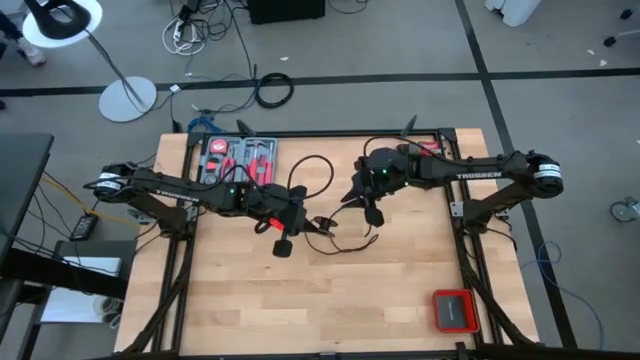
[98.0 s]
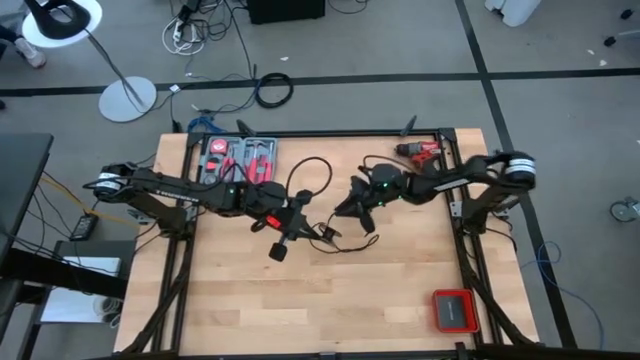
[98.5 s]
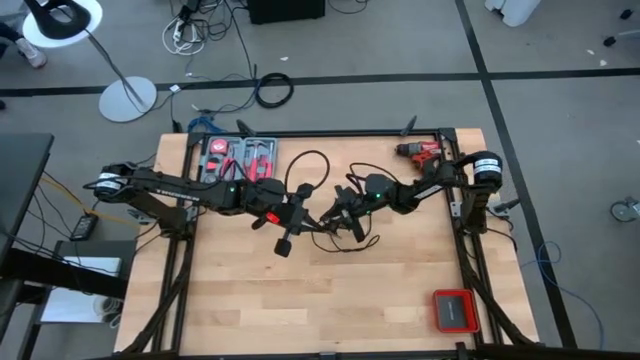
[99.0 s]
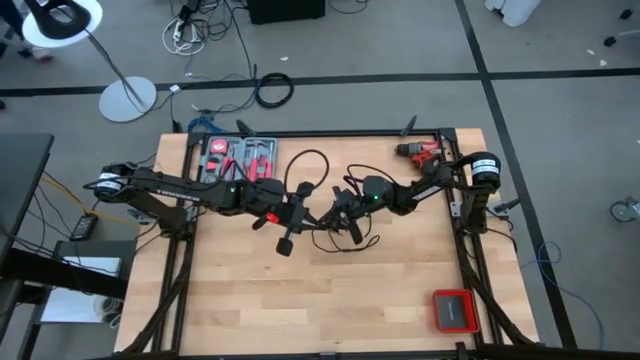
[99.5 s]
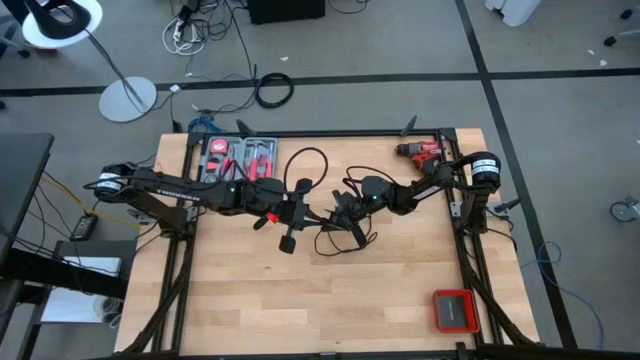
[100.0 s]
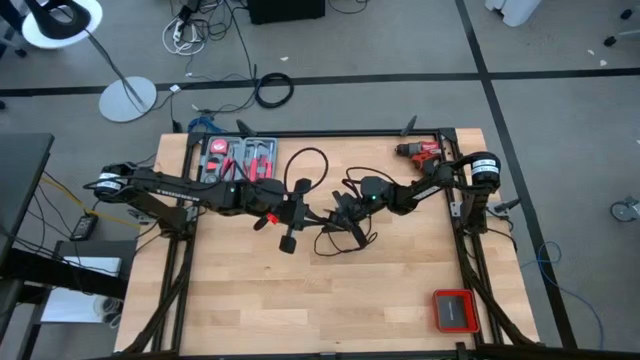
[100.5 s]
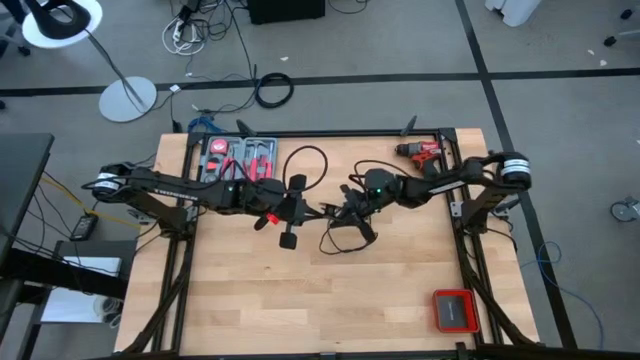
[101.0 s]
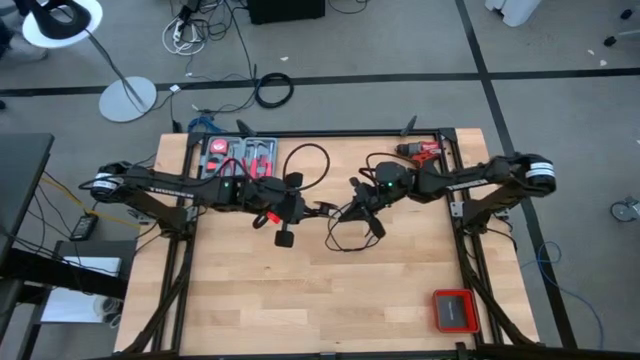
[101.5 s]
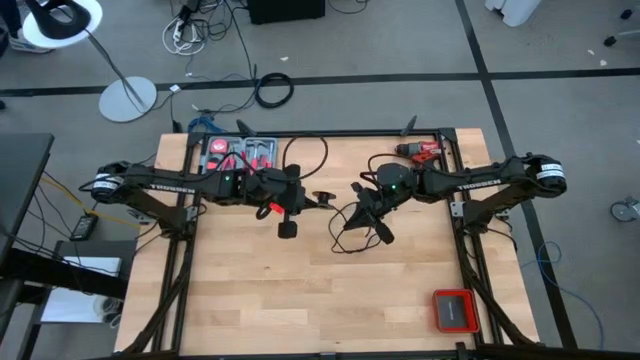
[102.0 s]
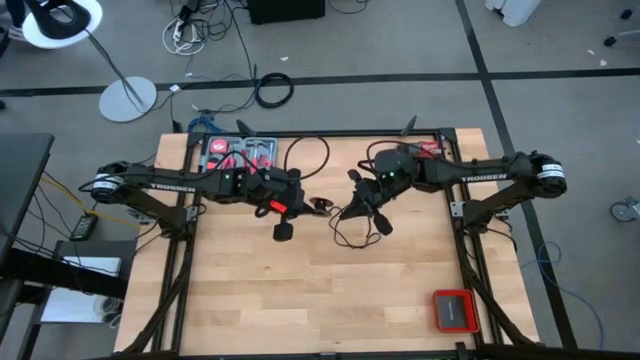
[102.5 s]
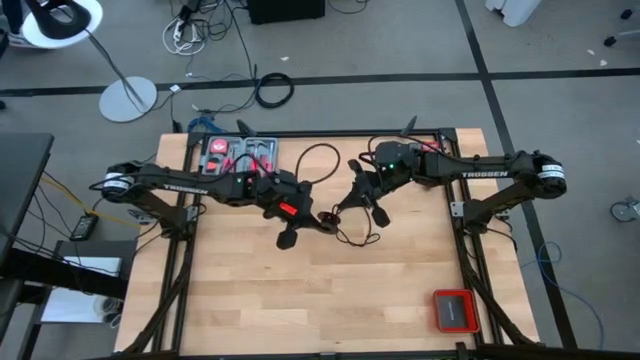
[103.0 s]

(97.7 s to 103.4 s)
Task: Coil cords
Coil the black wire on the black spool

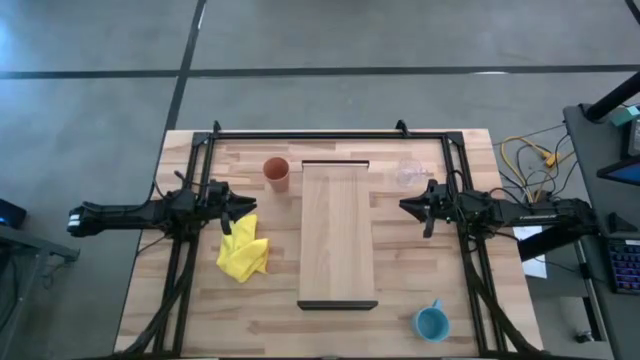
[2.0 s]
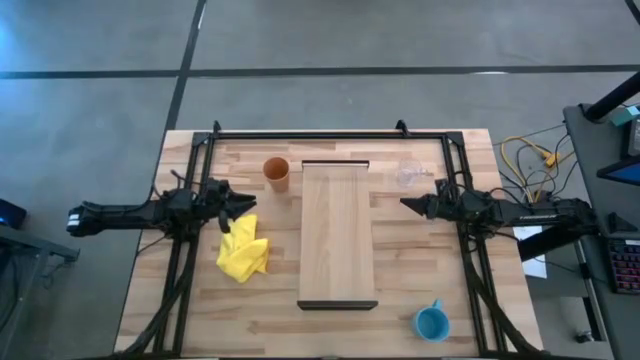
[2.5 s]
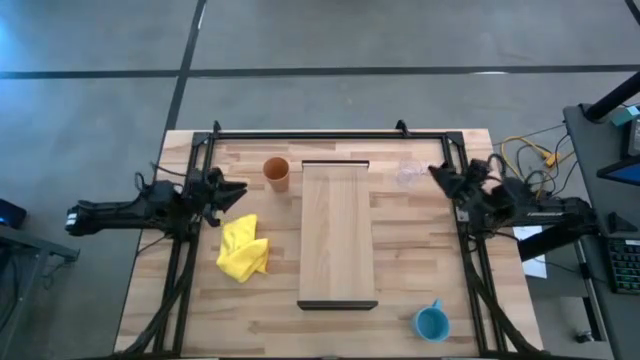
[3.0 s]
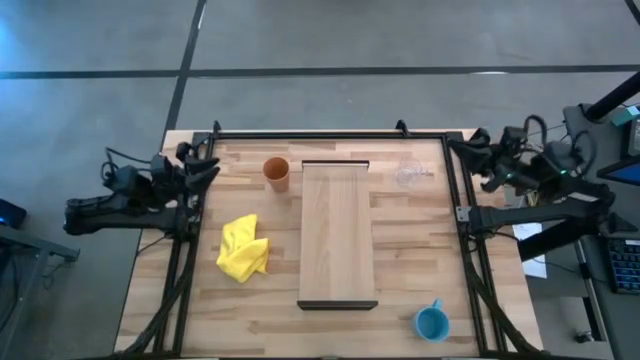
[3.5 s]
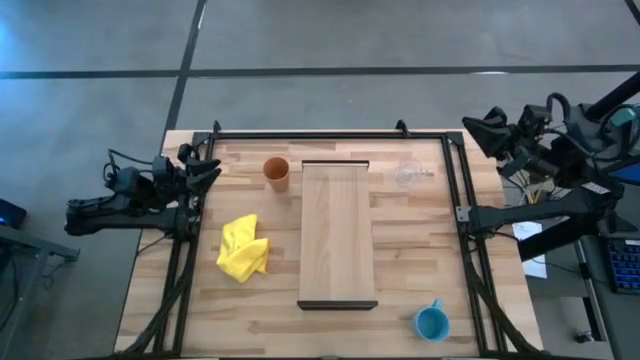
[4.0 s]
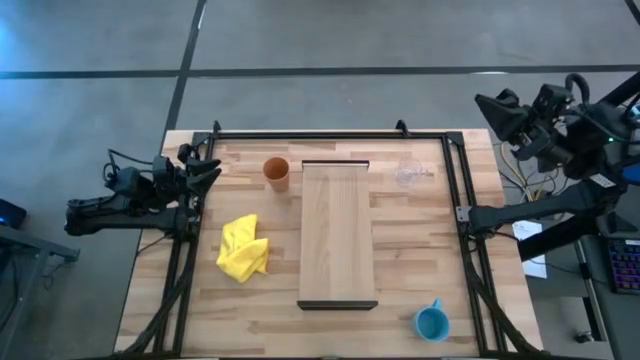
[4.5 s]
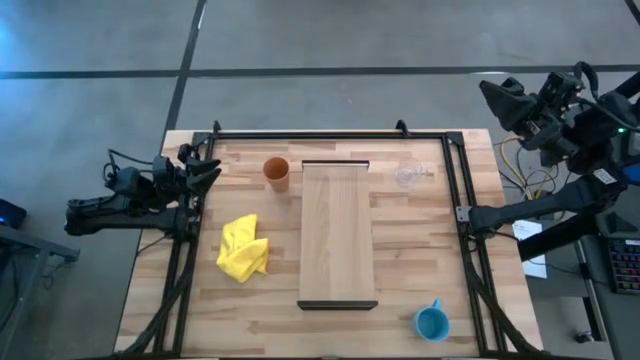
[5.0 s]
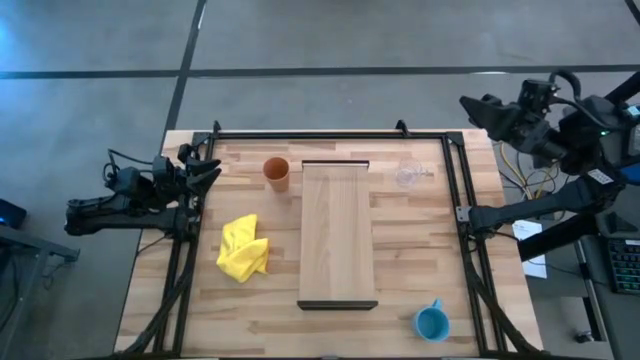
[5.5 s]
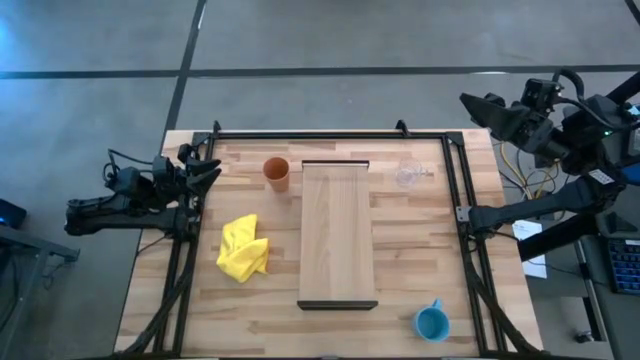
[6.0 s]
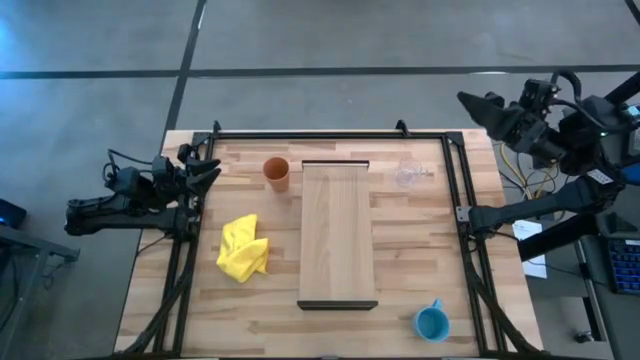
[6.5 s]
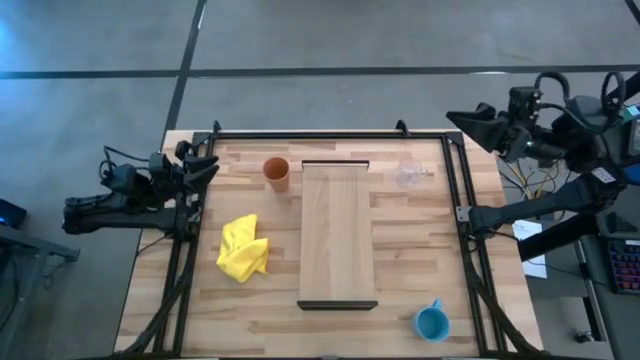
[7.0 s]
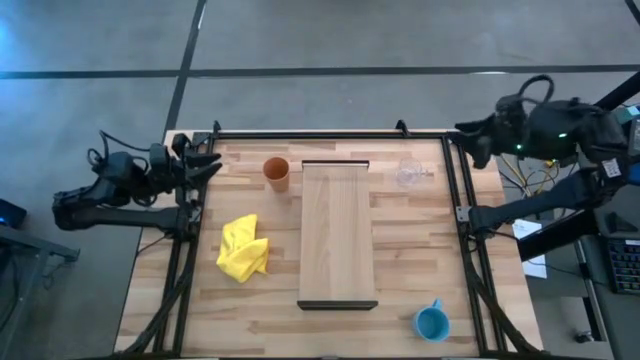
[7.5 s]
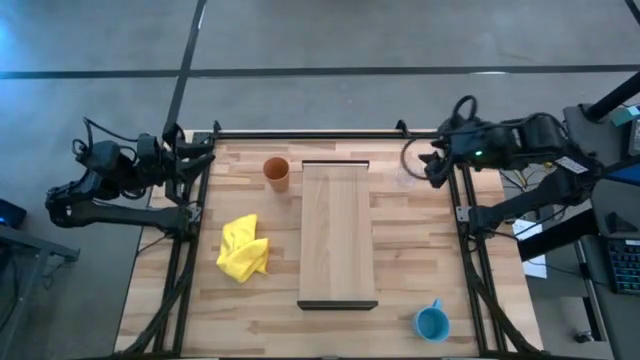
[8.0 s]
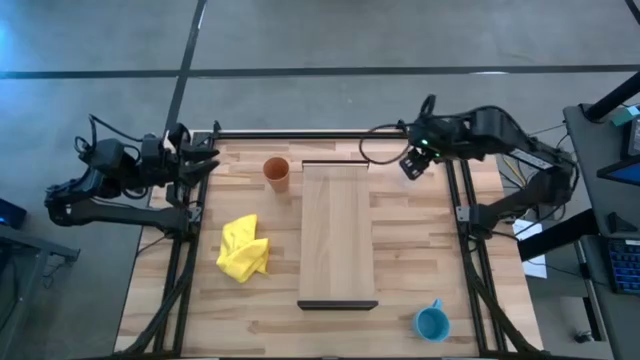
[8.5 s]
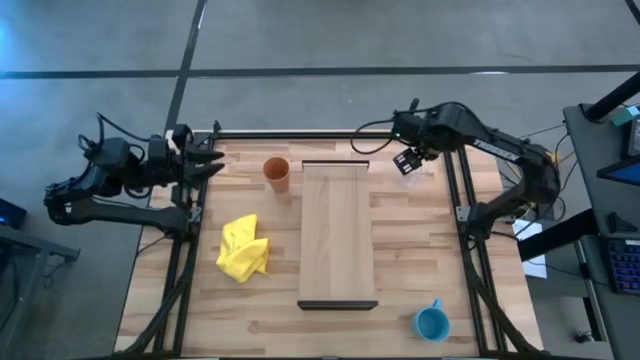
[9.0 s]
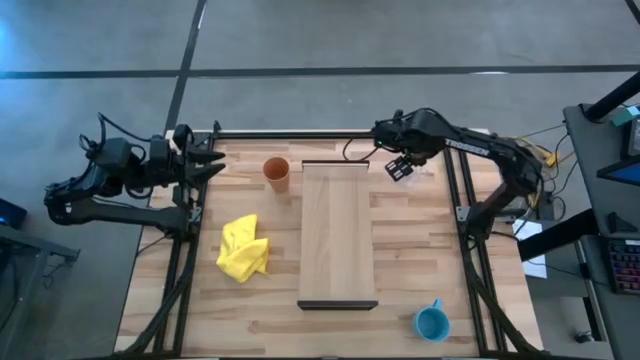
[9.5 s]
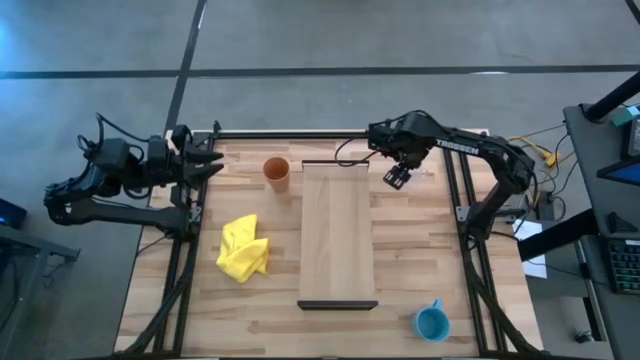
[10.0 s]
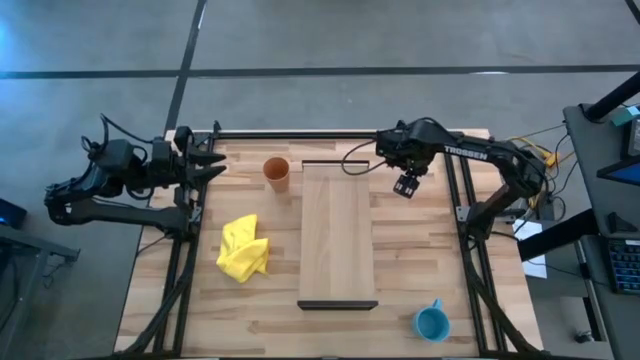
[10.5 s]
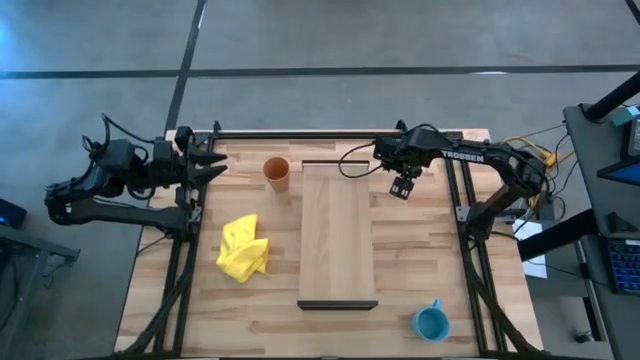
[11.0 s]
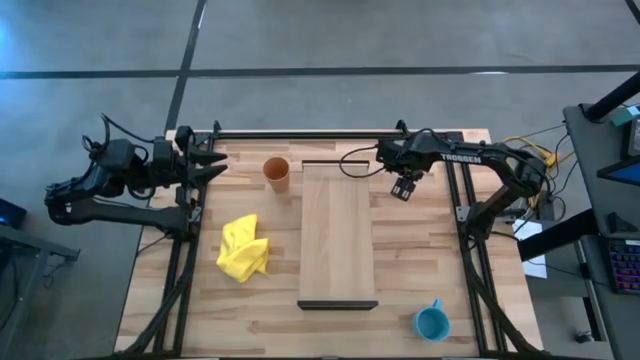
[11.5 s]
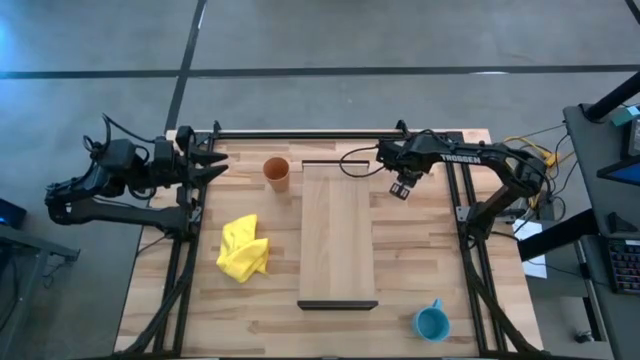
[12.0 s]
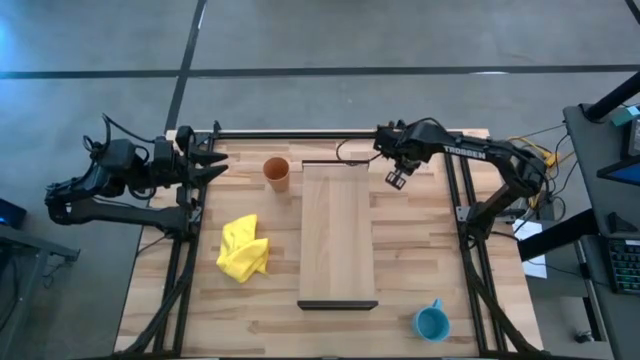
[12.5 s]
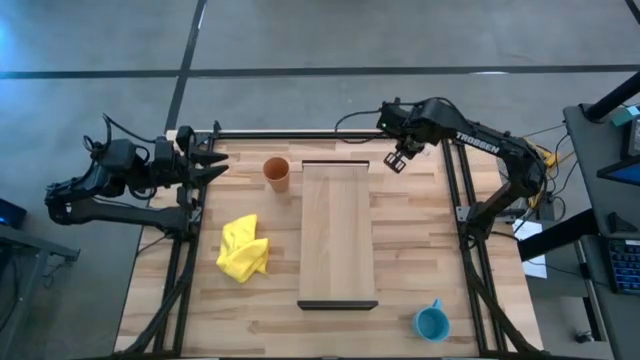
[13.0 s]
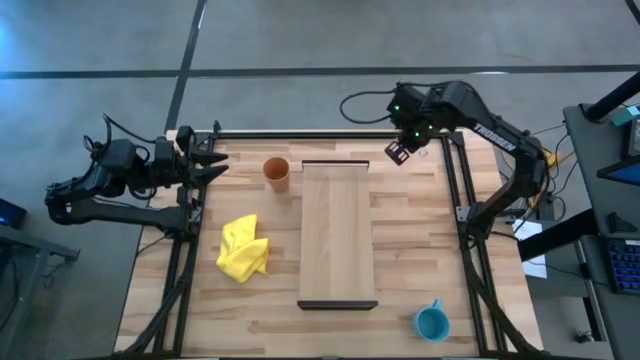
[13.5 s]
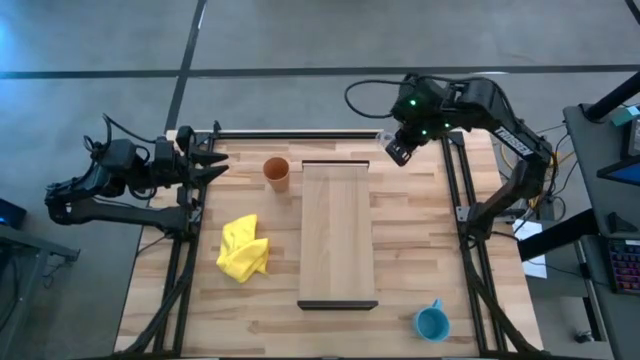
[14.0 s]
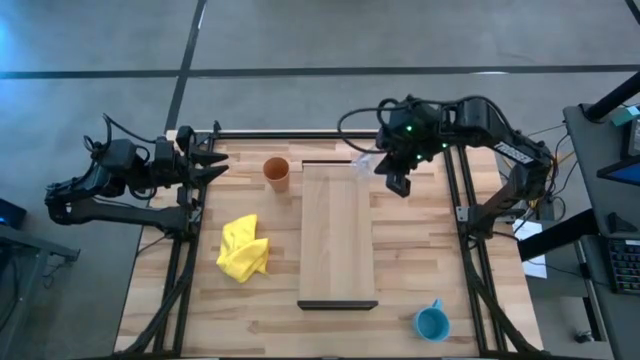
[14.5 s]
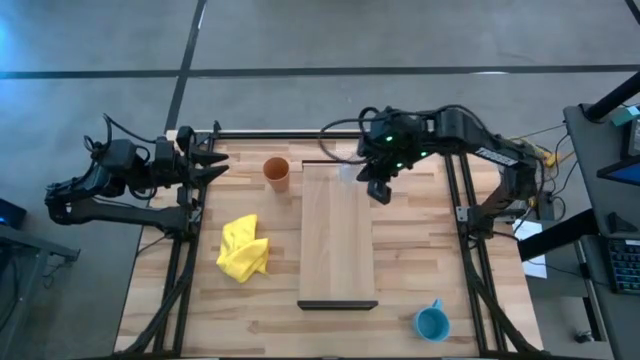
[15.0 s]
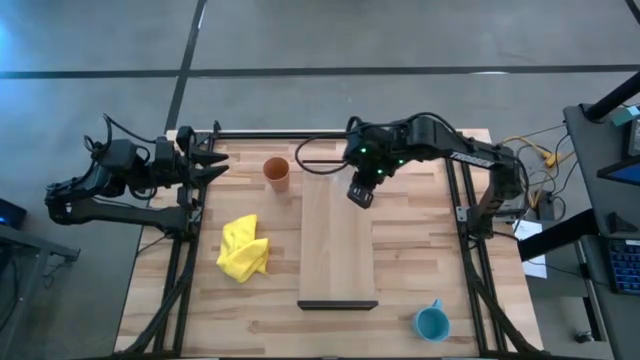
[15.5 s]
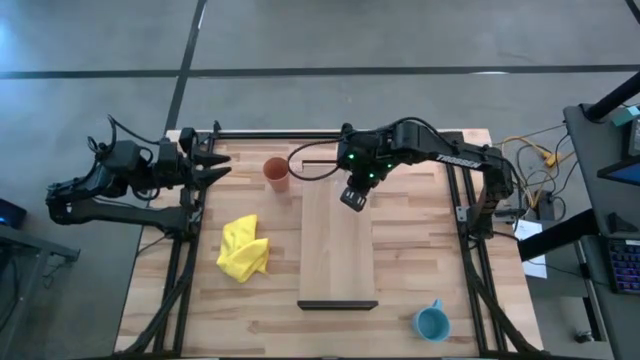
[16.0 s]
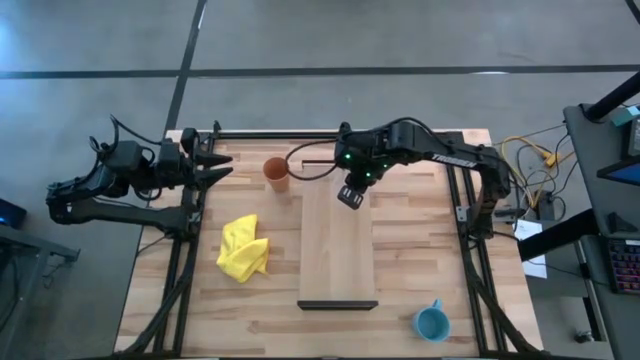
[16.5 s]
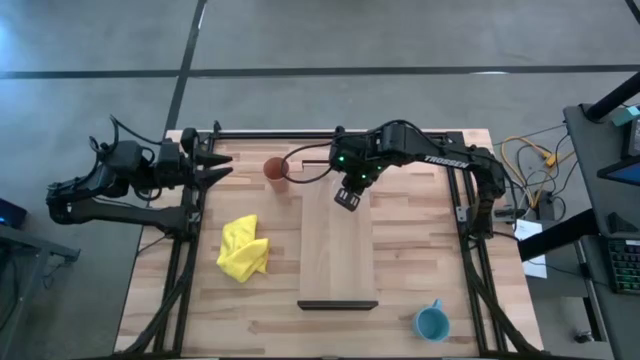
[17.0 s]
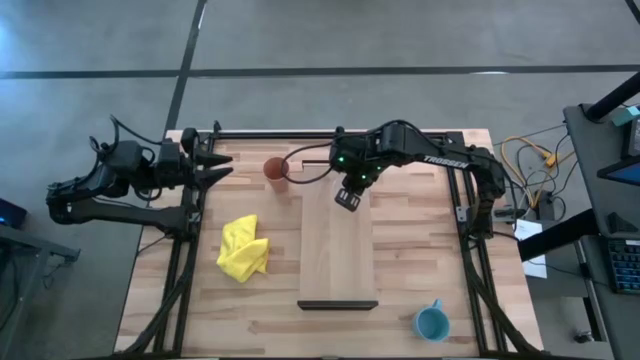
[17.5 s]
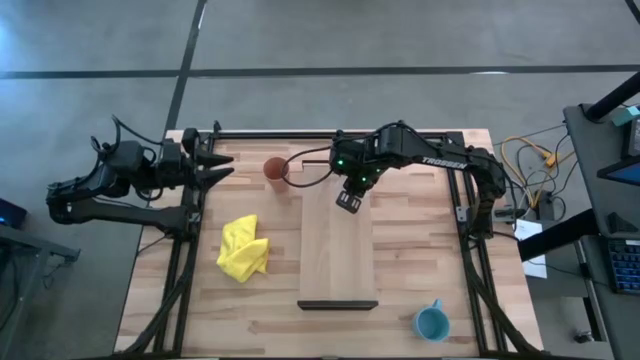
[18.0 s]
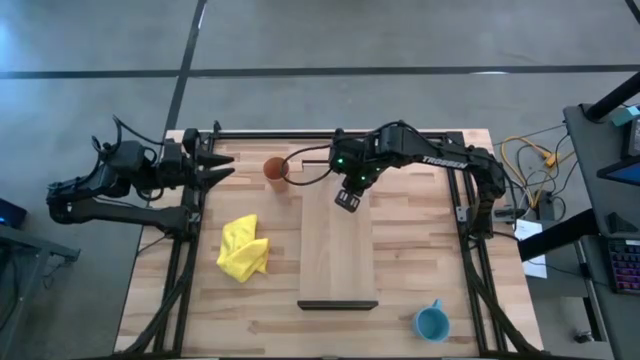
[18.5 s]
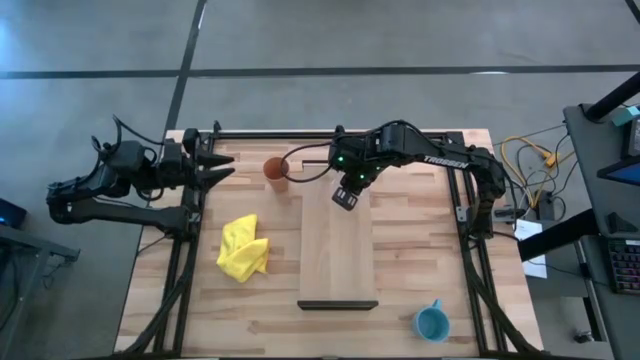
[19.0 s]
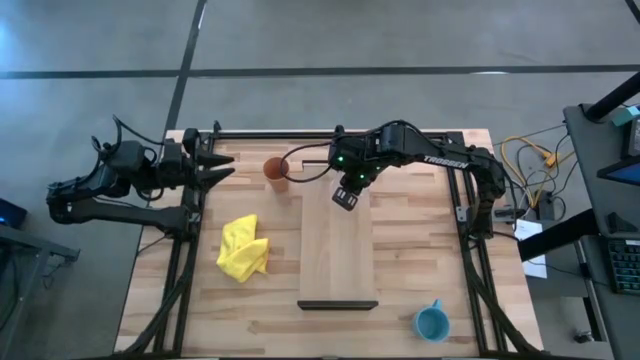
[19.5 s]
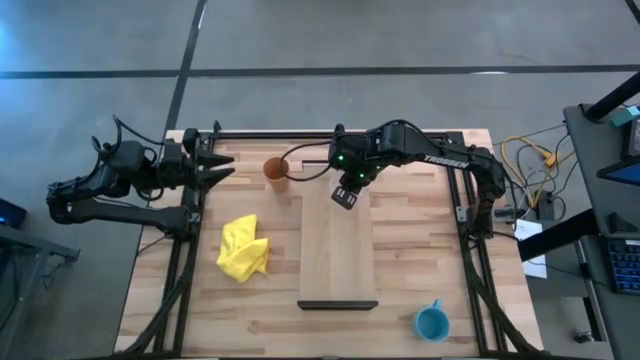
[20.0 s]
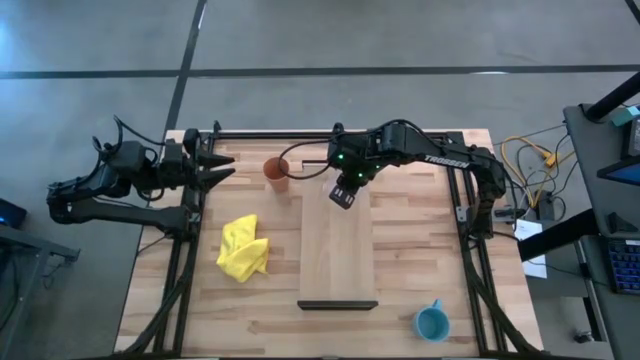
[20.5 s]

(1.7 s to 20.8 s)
Task: Stack small to large cups/mugs on shelf
Put the transparent mug on the shelf
